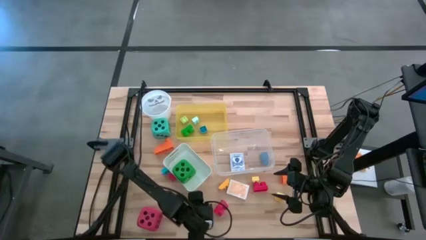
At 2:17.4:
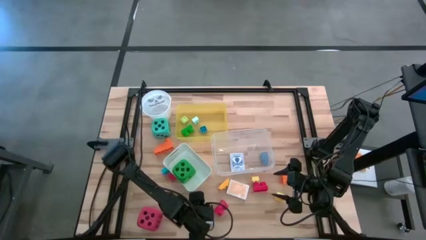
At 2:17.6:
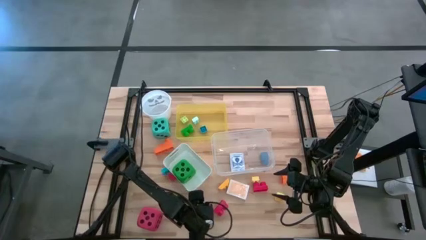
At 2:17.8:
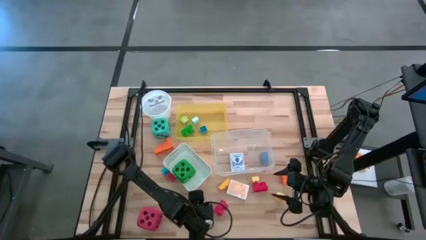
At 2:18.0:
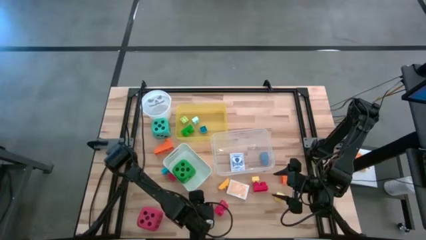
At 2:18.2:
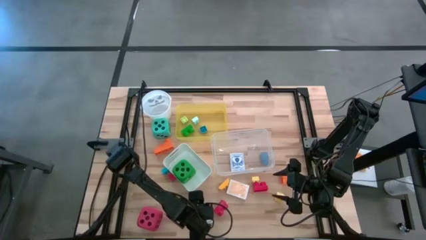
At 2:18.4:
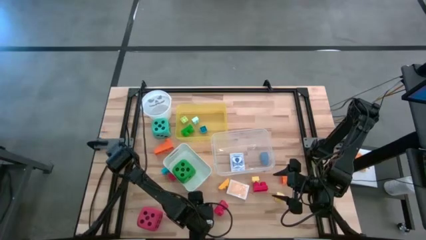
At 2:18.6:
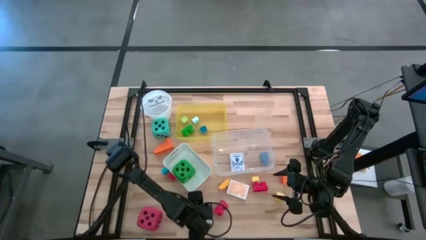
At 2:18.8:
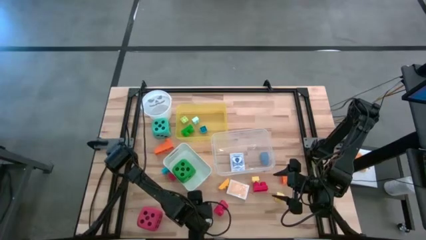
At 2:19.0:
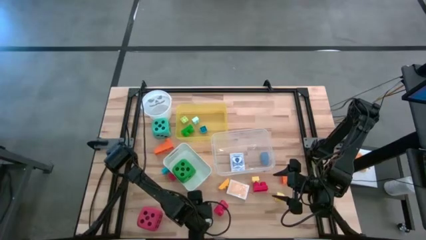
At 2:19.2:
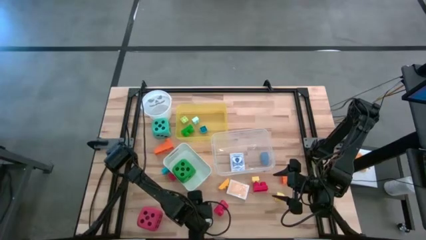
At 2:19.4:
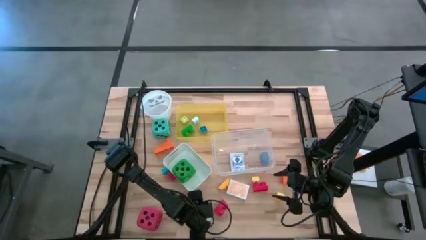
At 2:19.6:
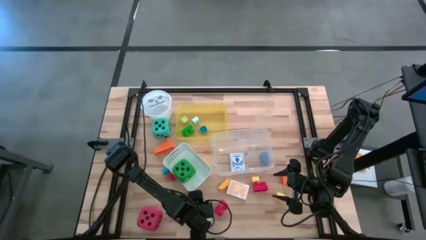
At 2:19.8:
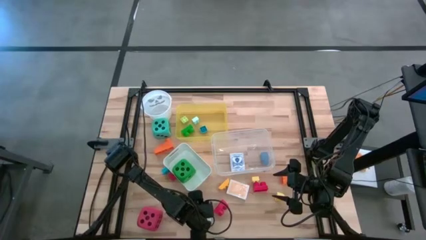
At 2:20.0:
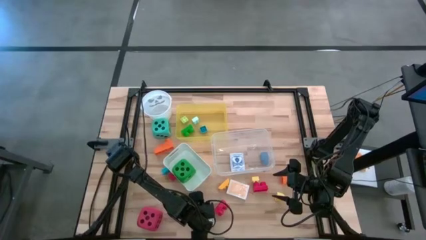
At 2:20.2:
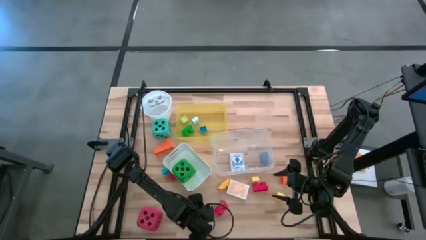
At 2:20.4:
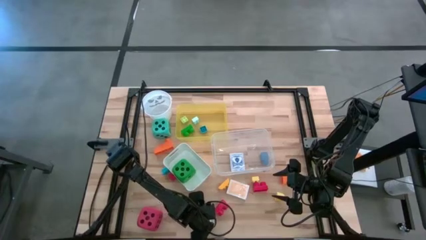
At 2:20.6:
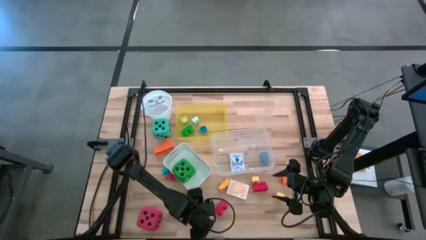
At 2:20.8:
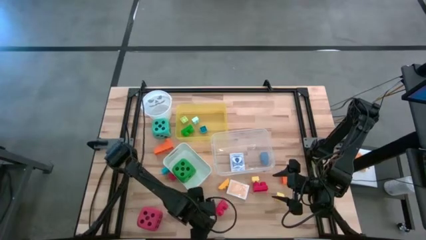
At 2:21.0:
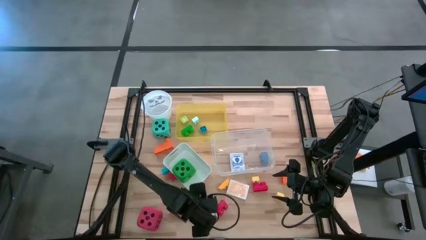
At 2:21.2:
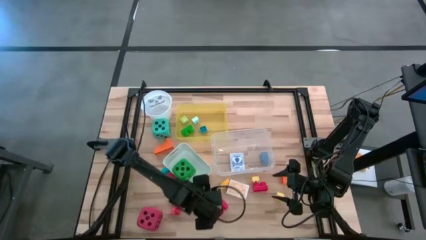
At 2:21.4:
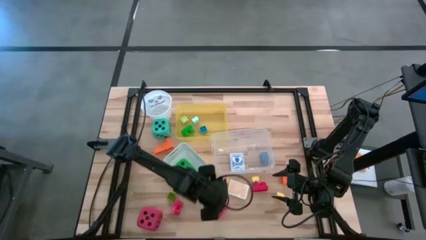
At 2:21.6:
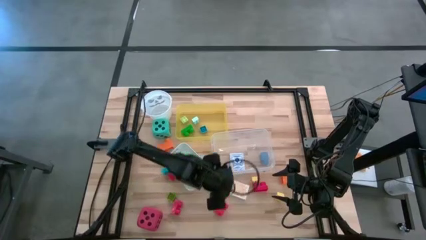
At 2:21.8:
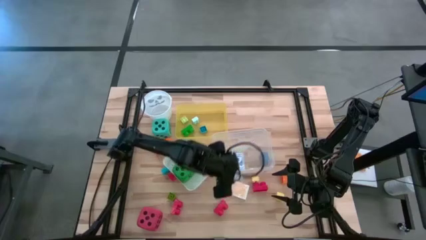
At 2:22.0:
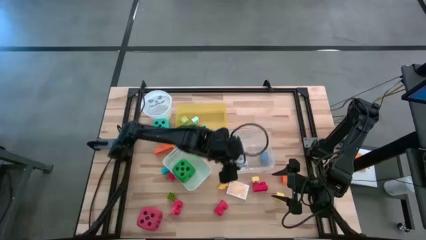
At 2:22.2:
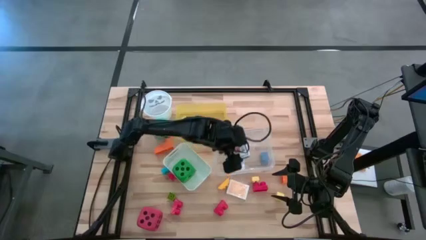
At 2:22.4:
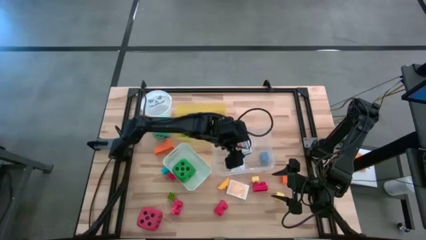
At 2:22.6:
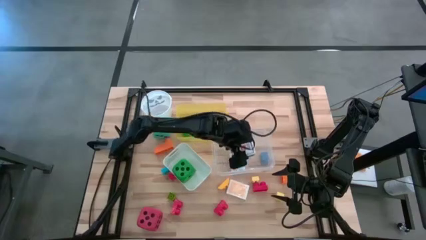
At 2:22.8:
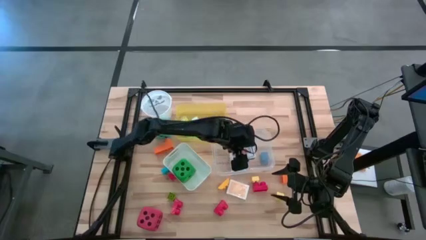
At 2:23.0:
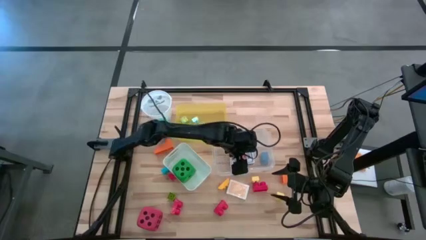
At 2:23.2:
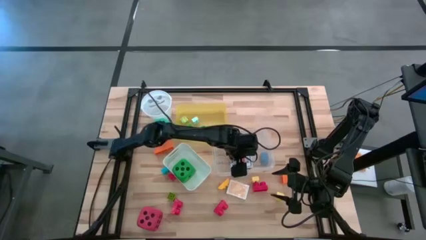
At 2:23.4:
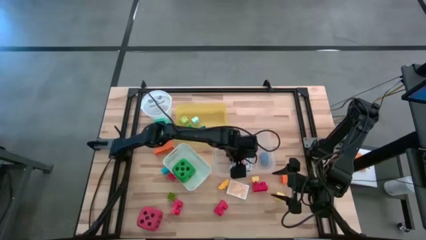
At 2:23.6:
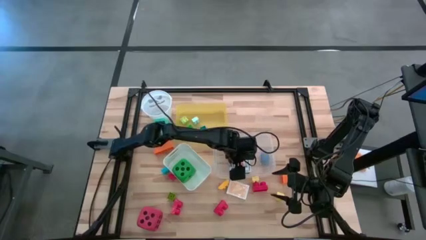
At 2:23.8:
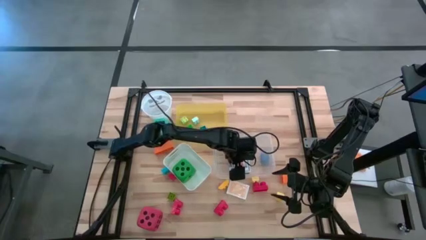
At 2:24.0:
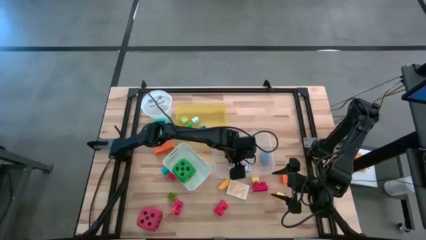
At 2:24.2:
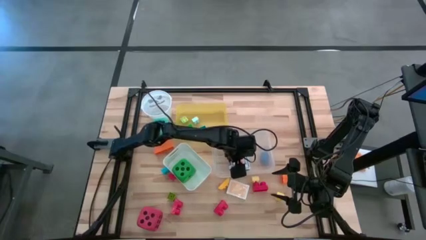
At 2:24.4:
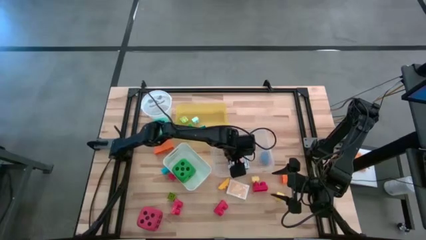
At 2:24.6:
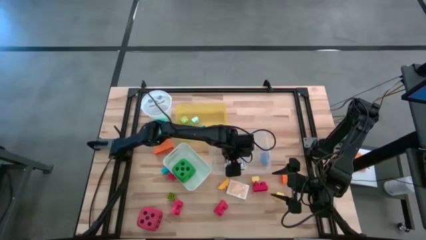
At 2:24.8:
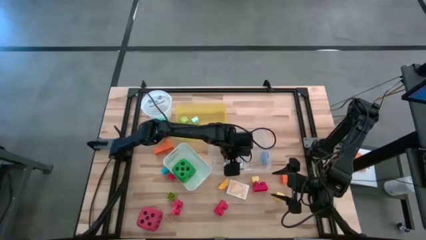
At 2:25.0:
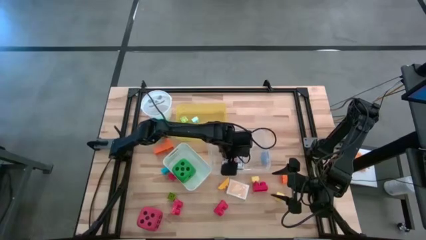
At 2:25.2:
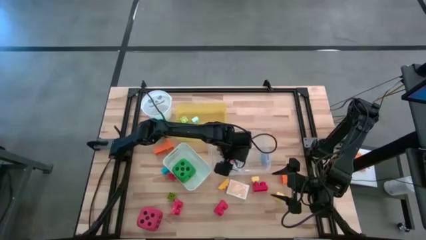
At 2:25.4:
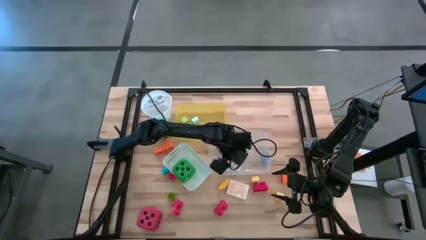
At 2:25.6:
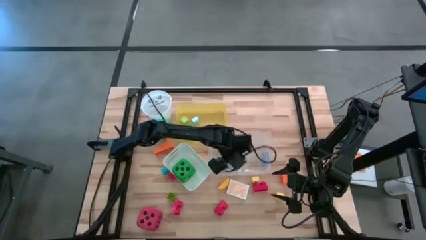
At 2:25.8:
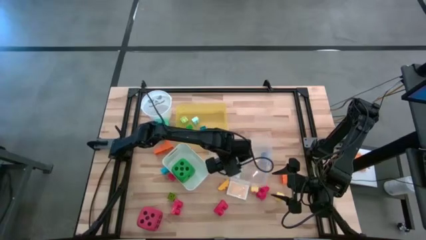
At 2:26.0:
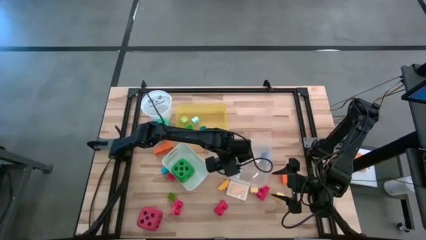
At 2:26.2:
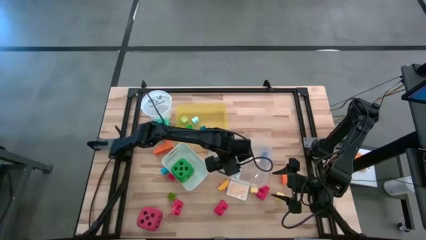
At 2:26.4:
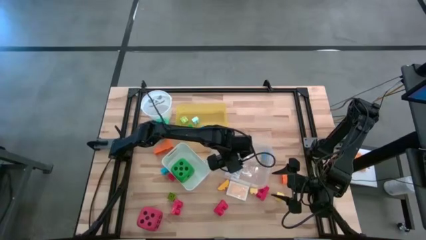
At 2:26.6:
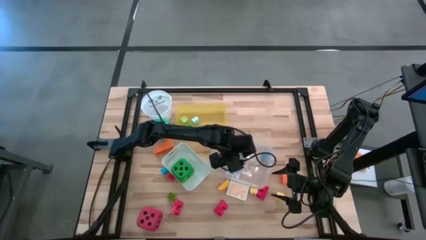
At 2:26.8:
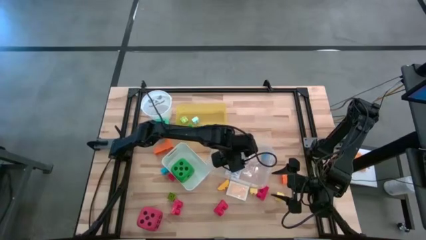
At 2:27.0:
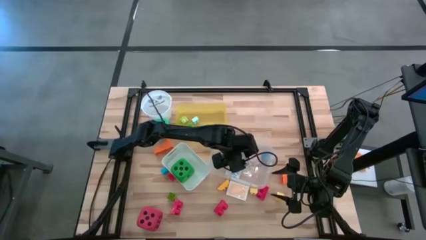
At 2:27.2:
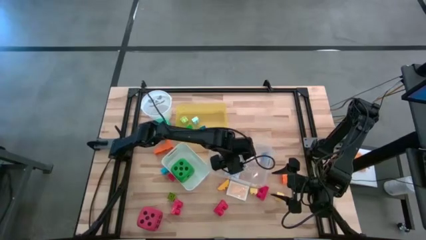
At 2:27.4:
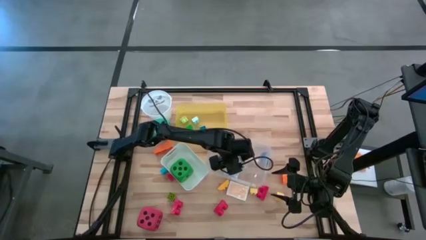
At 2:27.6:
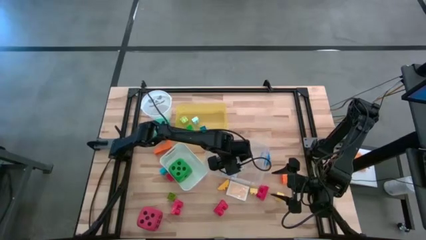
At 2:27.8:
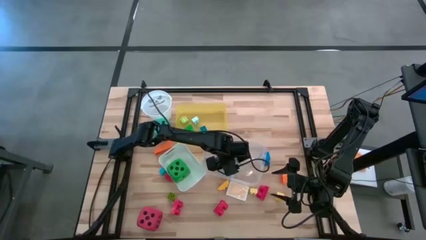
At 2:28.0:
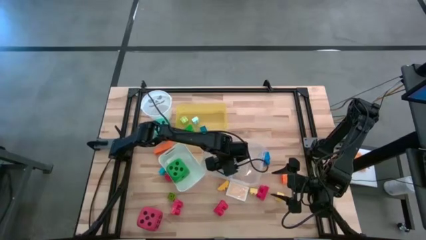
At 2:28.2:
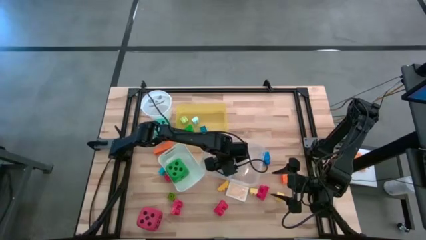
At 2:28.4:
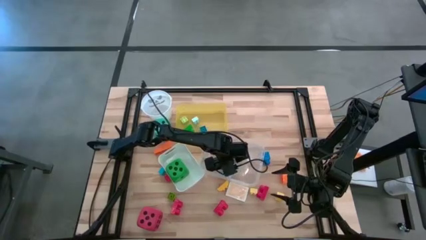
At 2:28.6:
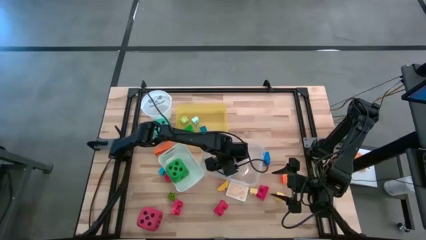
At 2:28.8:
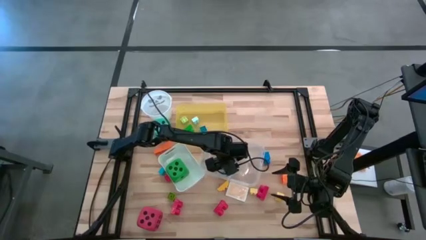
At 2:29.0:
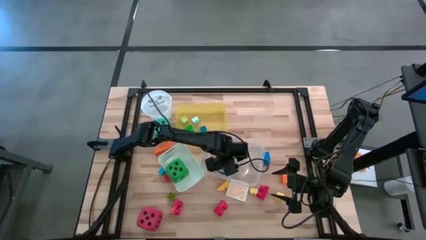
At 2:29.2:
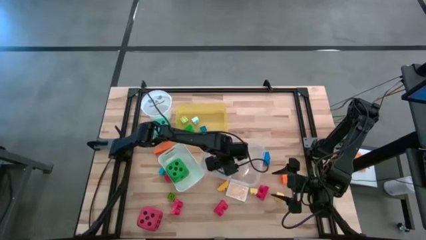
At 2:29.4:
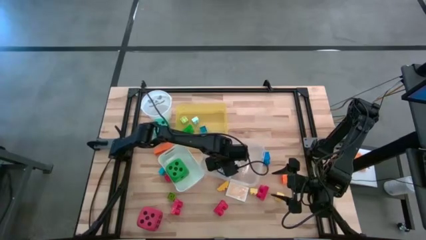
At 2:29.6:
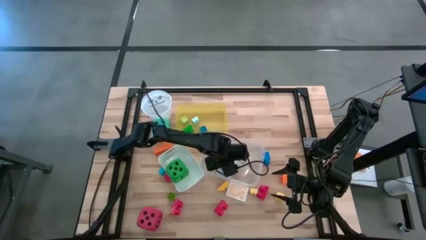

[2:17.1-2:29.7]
Task: Pick & Place Toys
Put the white game card pack into the transparent bin

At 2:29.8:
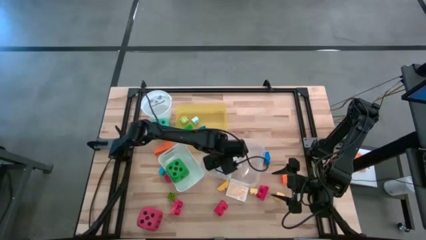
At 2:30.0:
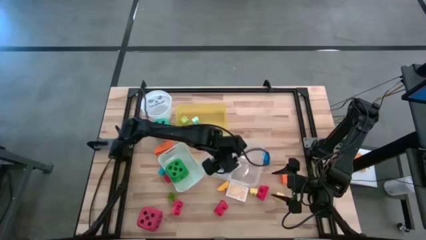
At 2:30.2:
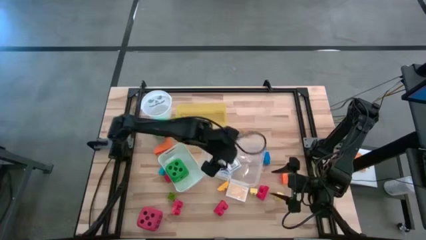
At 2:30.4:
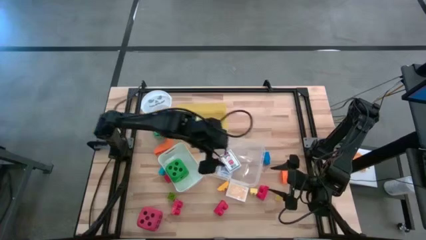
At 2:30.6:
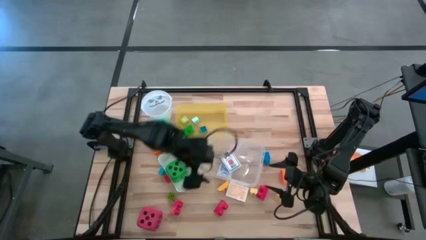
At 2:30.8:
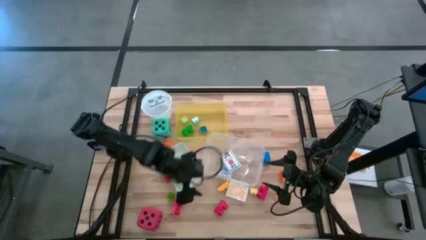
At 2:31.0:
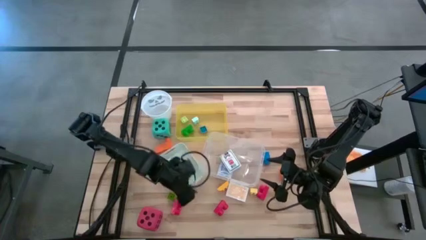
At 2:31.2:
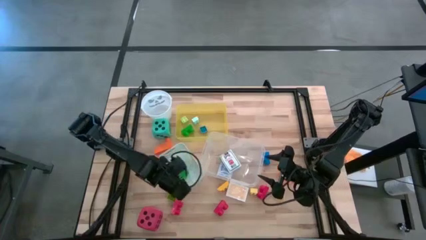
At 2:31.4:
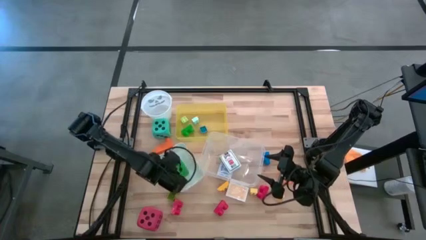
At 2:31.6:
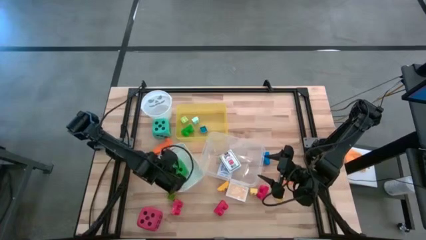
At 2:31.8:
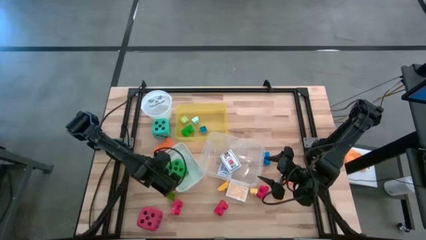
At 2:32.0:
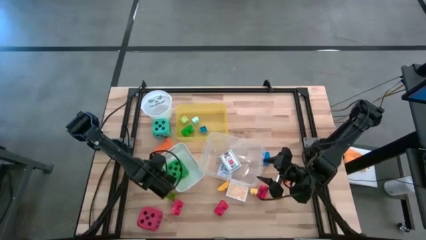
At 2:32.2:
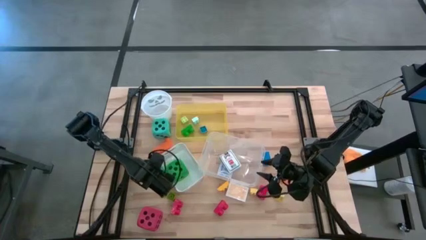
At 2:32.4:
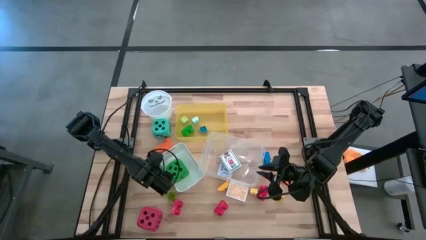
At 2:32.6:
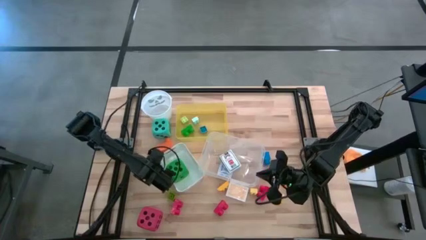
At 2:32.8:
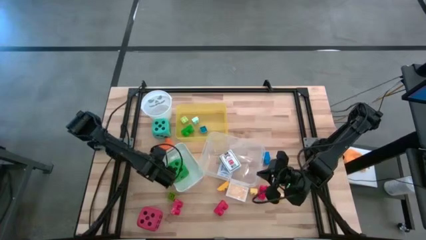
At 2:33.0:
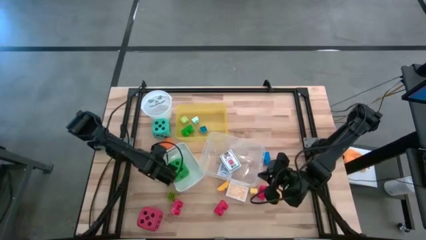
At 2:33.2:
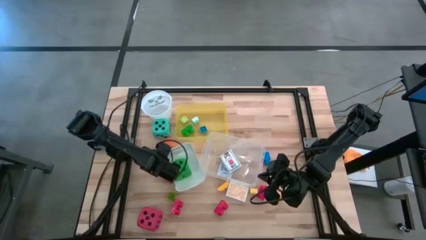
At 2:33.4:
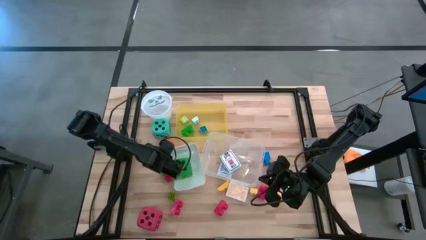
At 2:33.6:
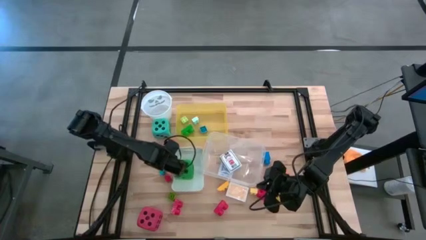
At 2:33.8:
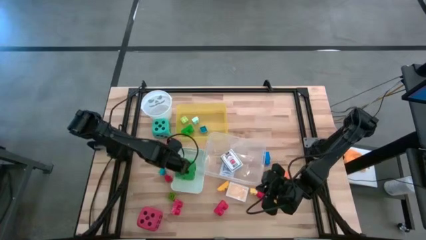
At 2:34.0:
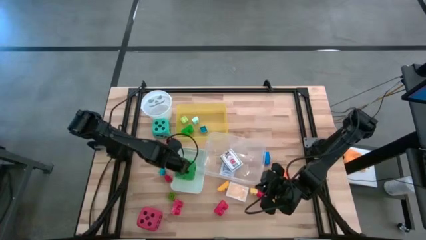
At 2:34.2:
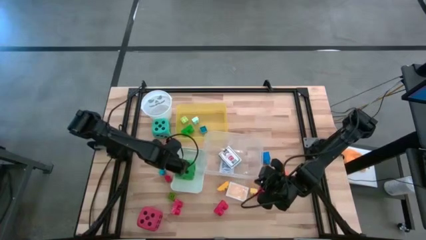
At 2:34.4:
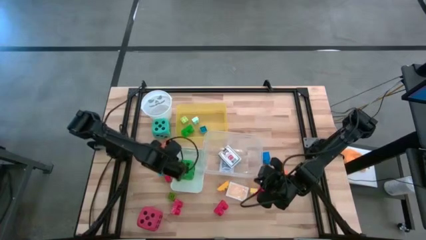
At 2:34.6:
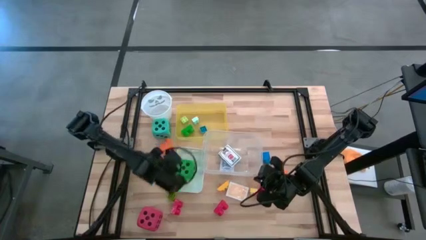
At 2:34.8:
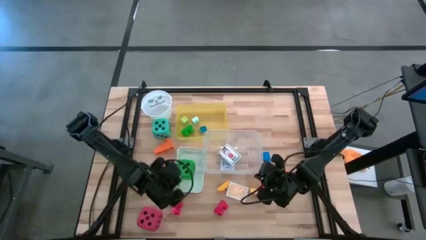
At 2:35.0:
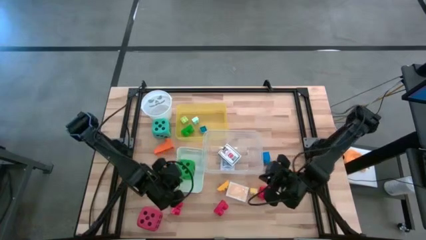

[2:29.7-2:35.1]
Adjust the white and transparent bins
